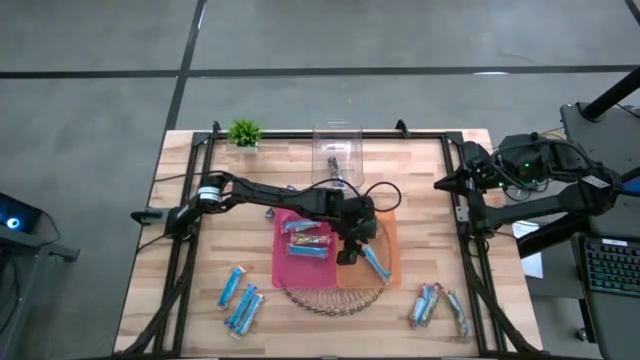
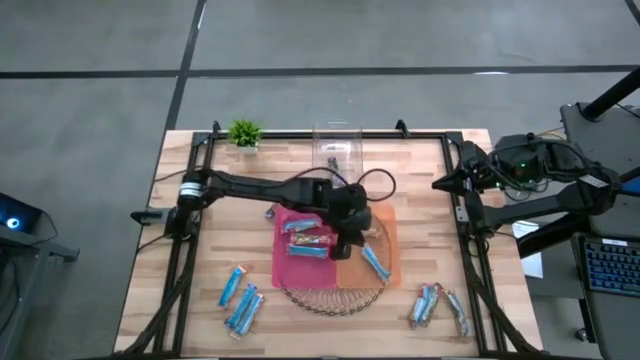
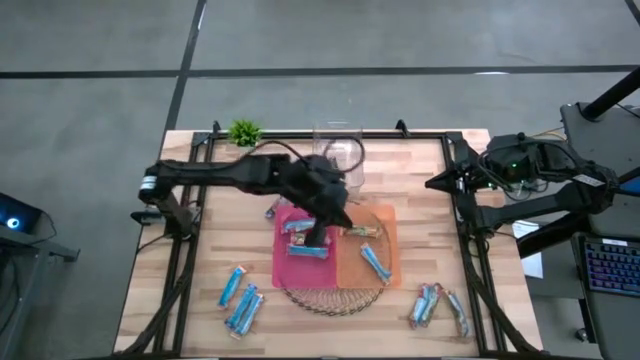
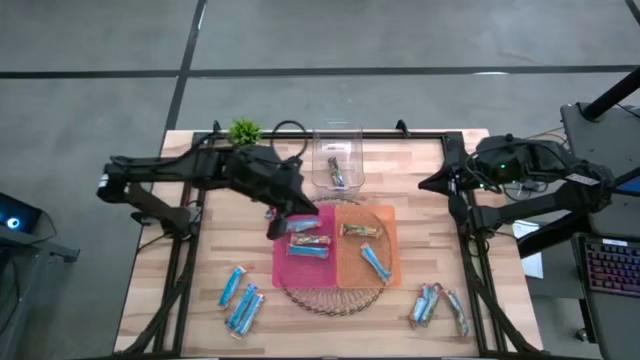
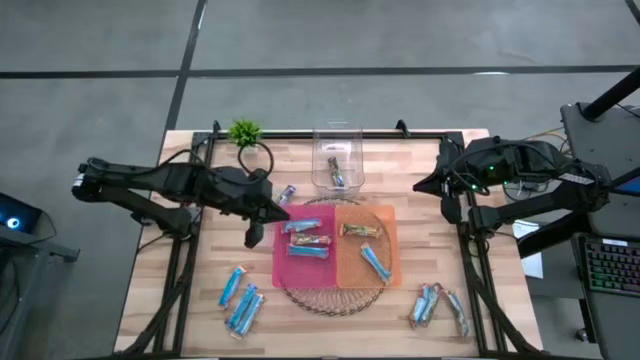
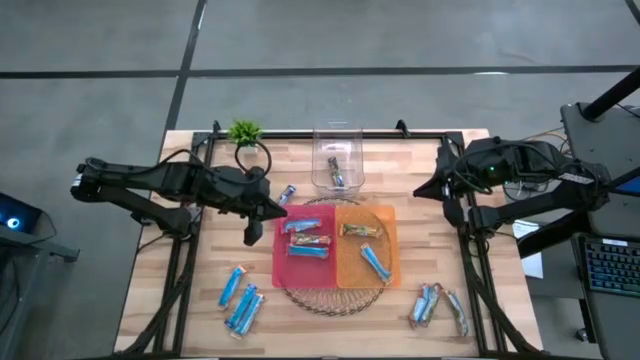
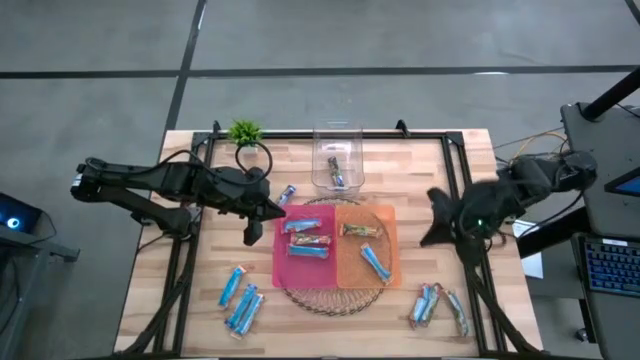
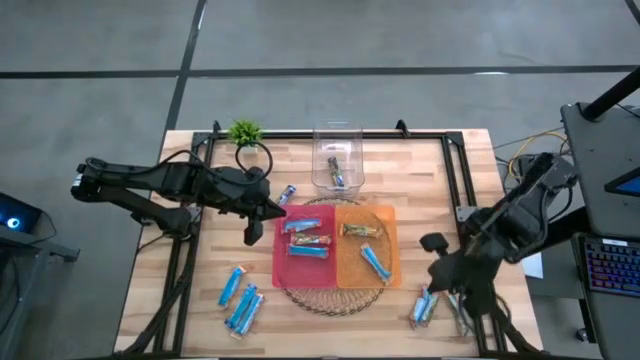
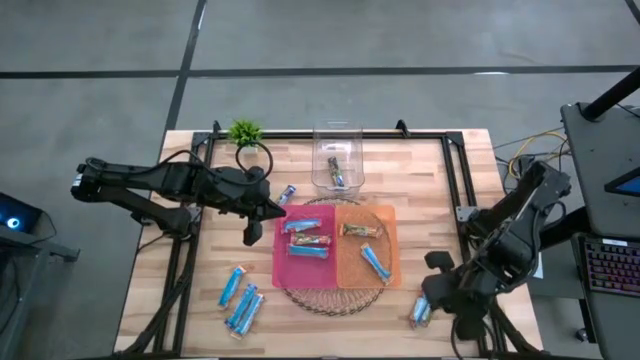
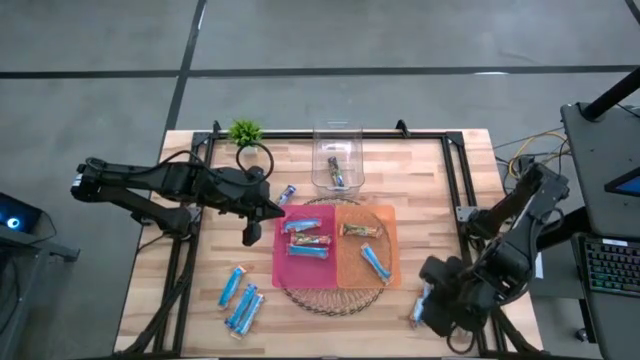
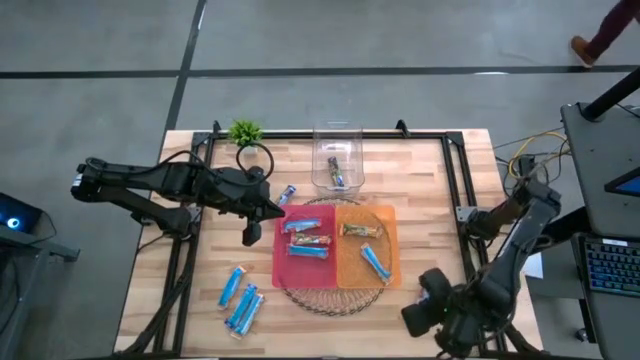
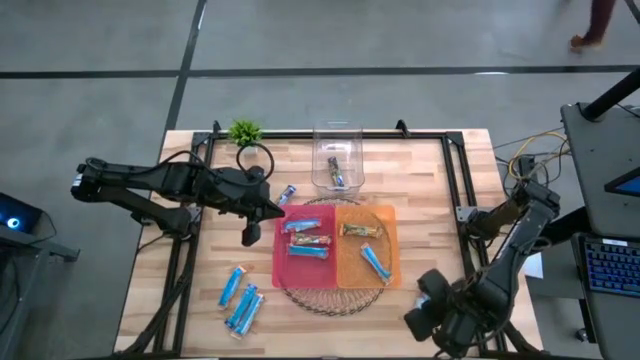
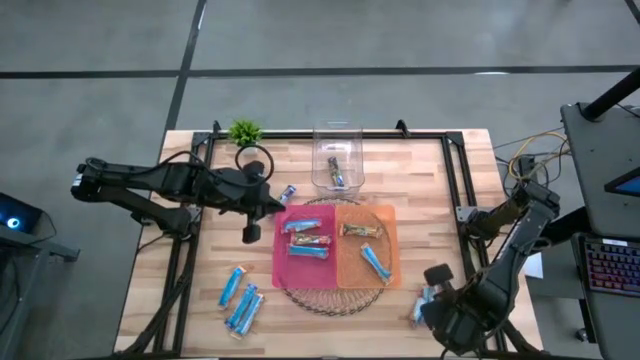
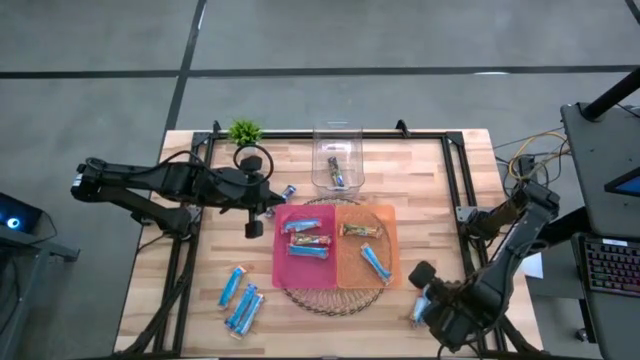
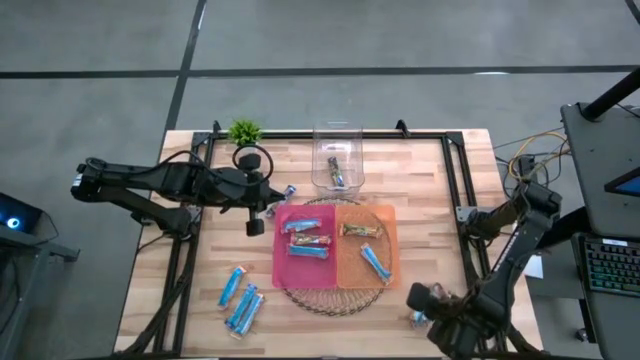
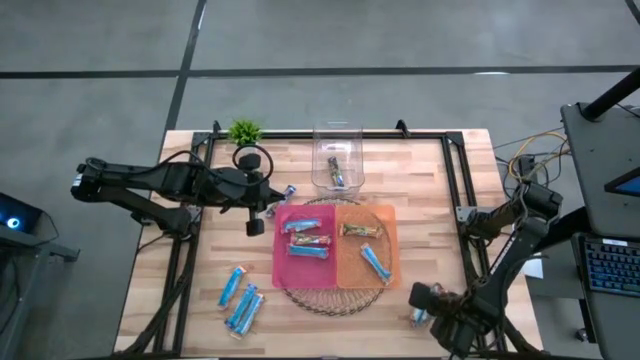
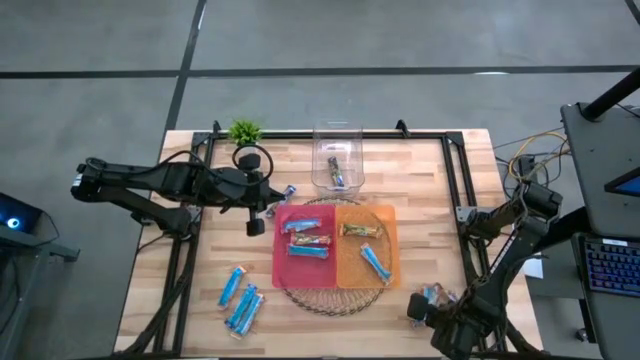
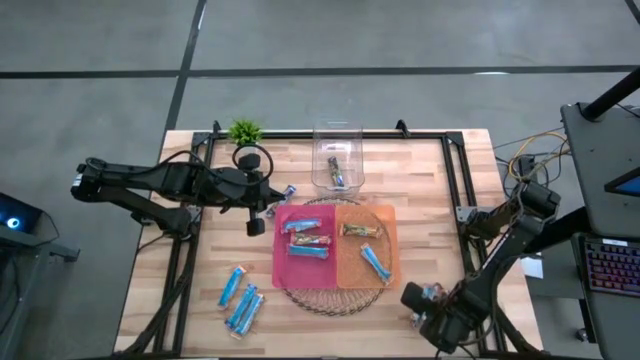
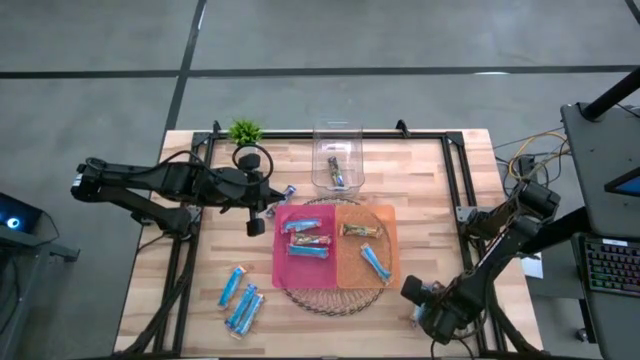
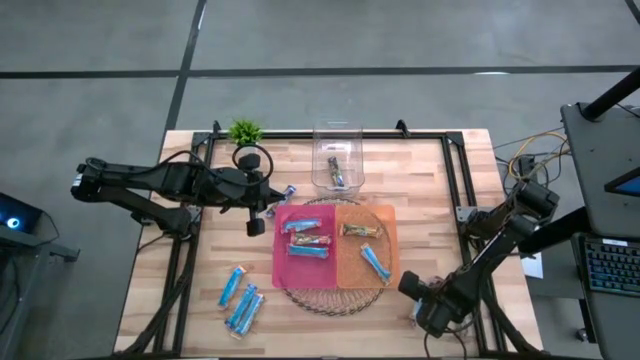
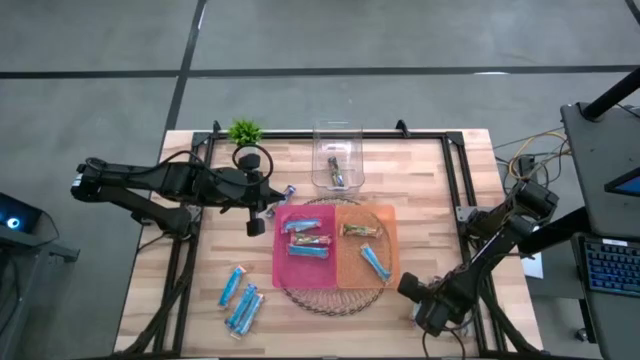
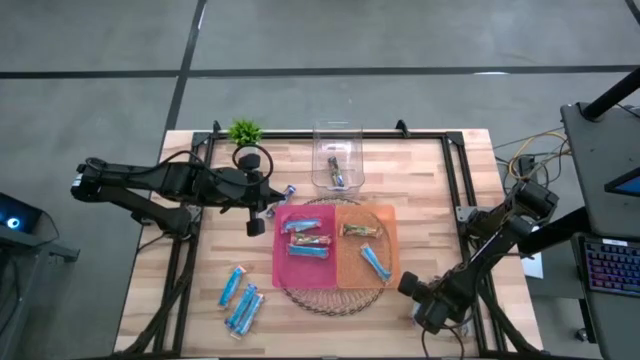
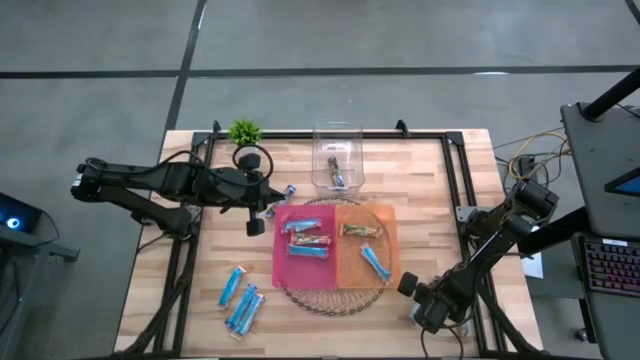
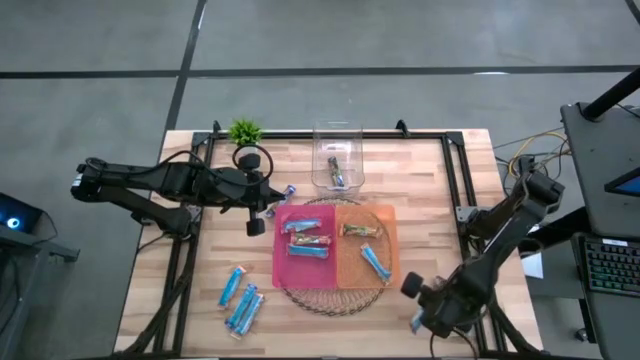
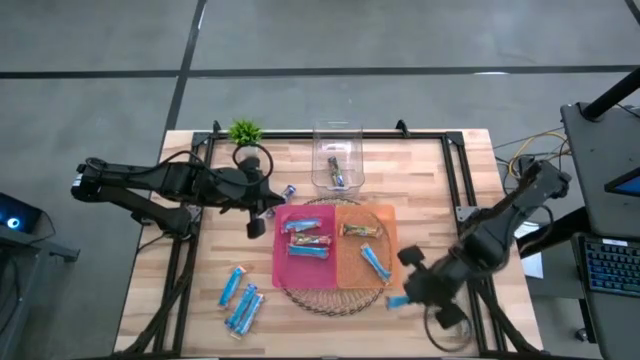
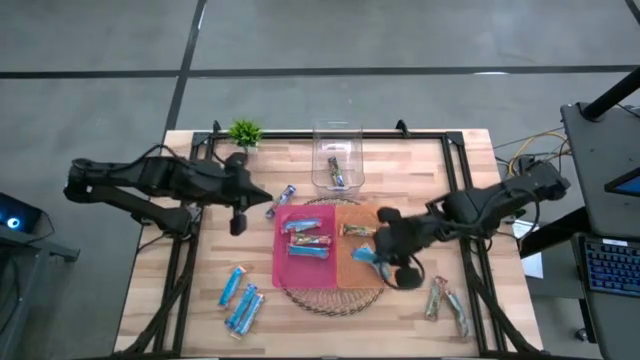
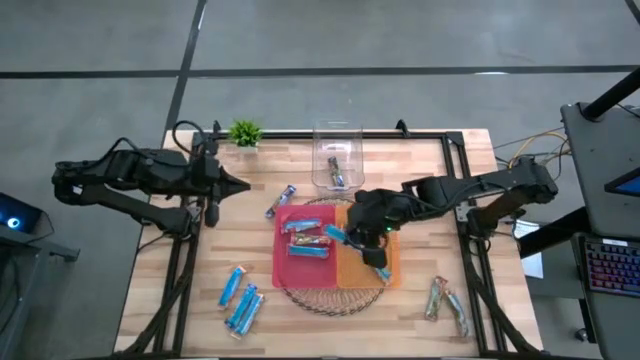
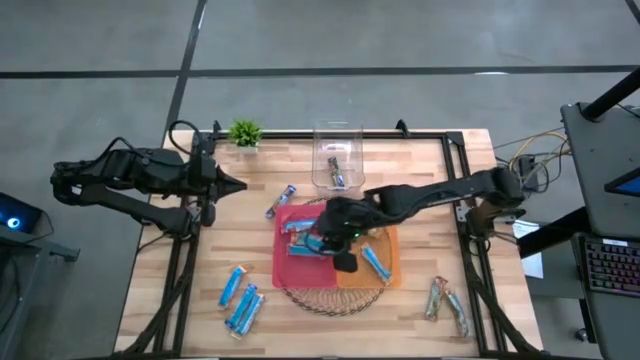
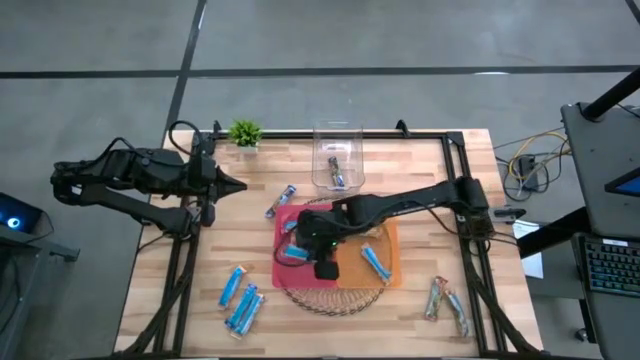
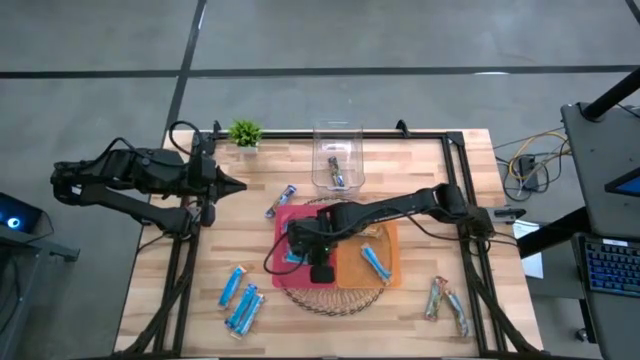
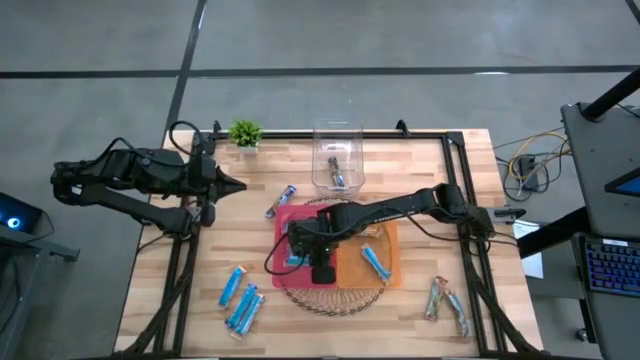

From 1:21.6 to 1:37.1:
Task: Pick and place Granola Bars by type
Put the red granola bar into the red bin

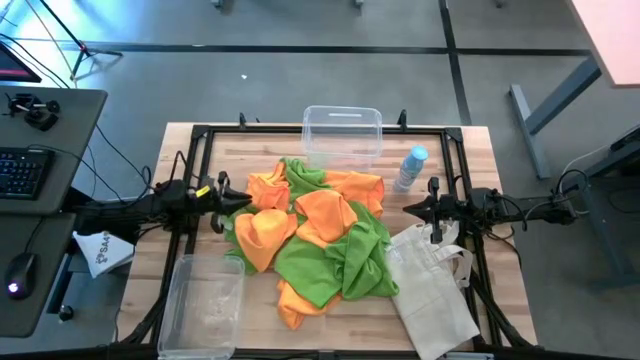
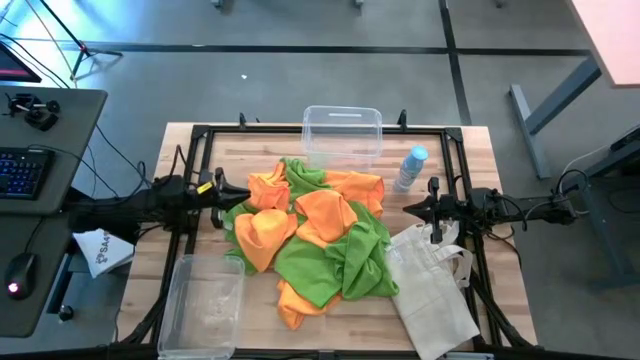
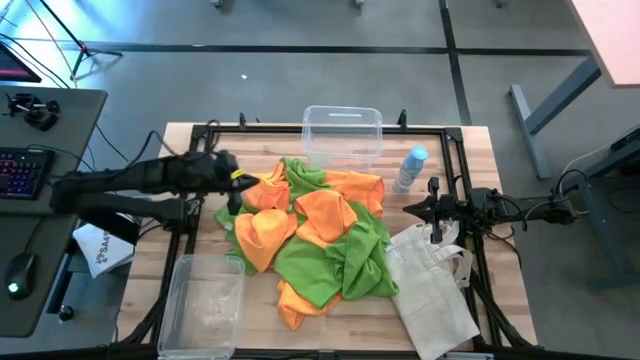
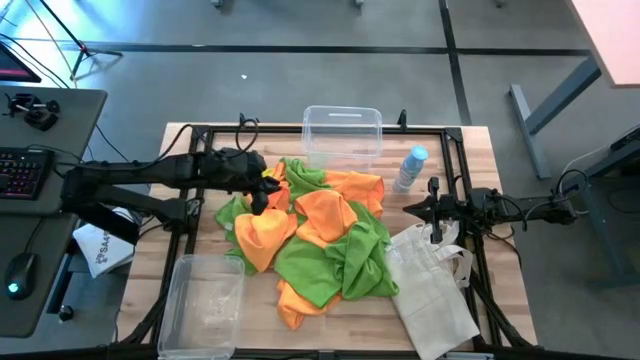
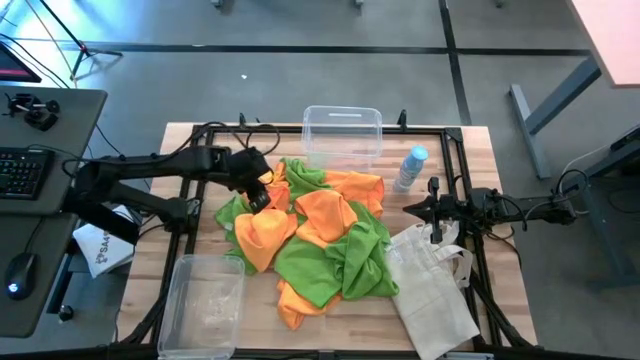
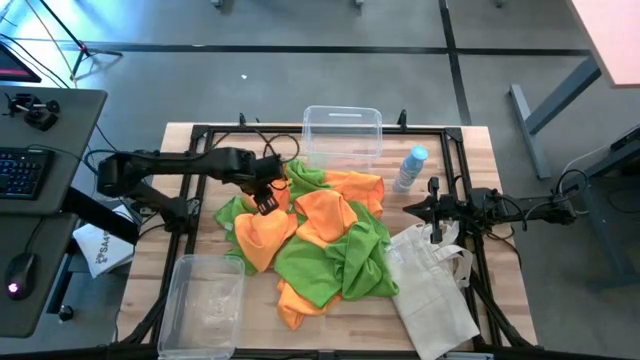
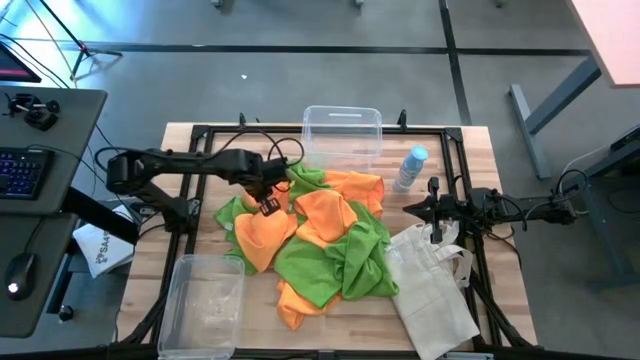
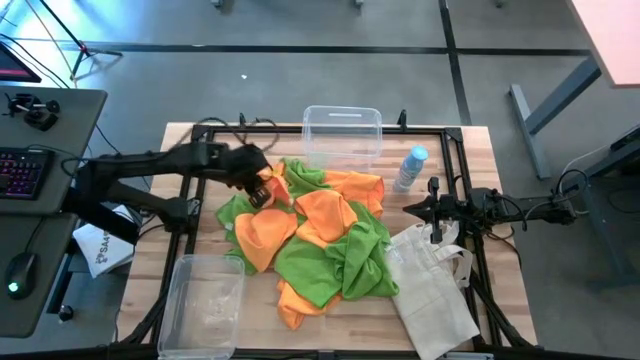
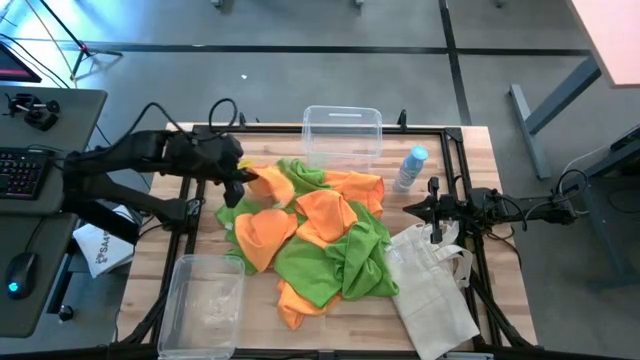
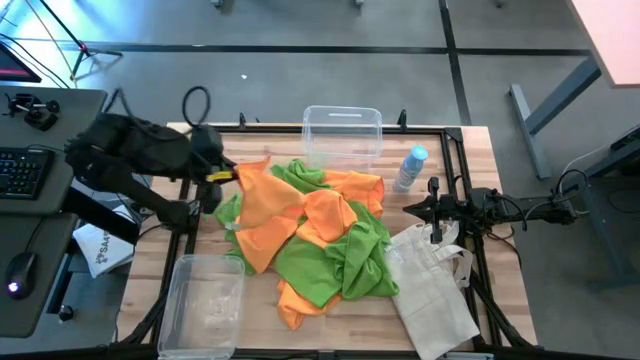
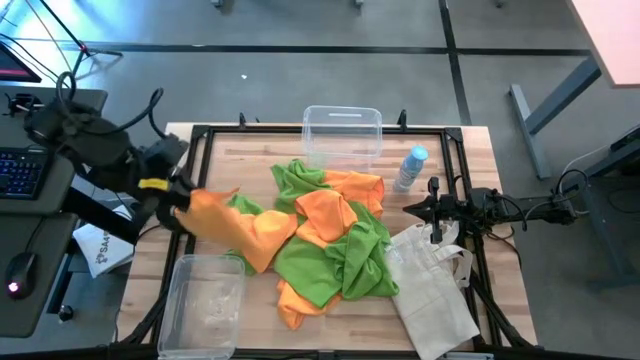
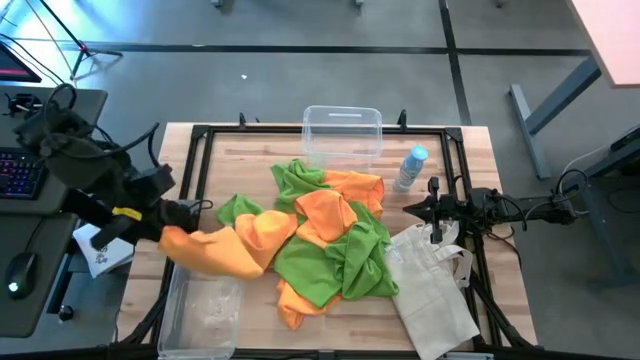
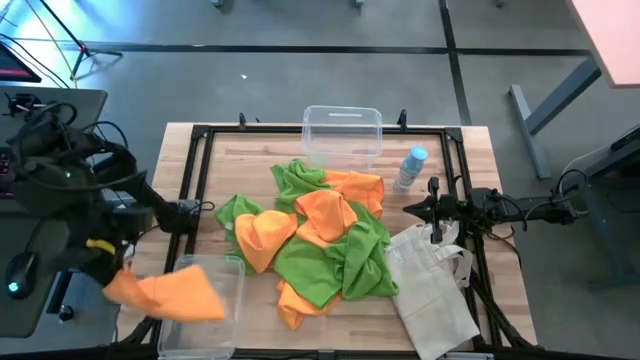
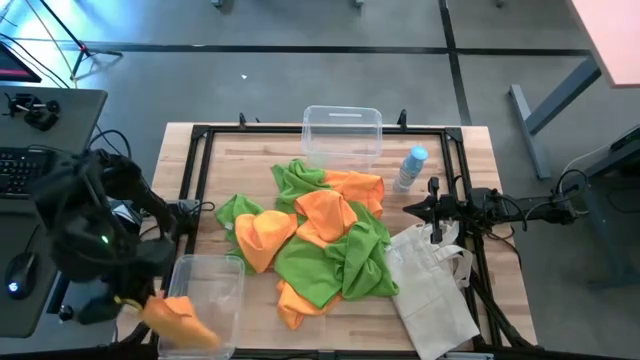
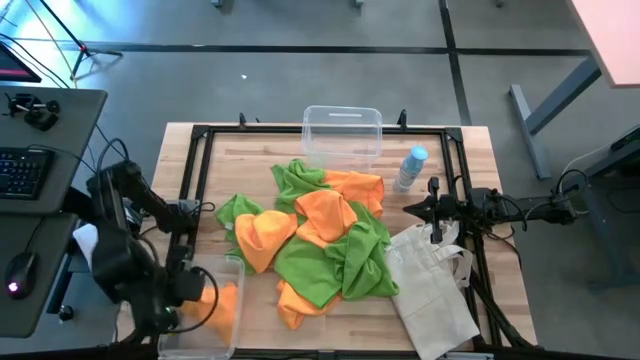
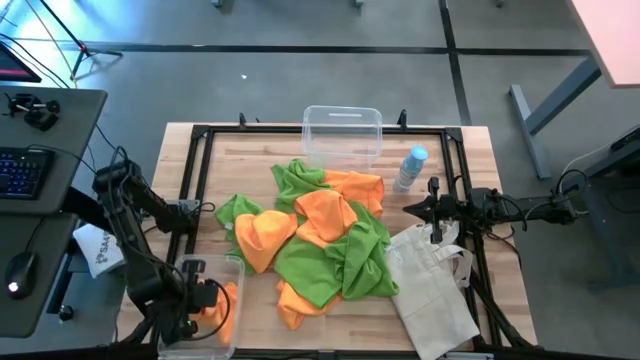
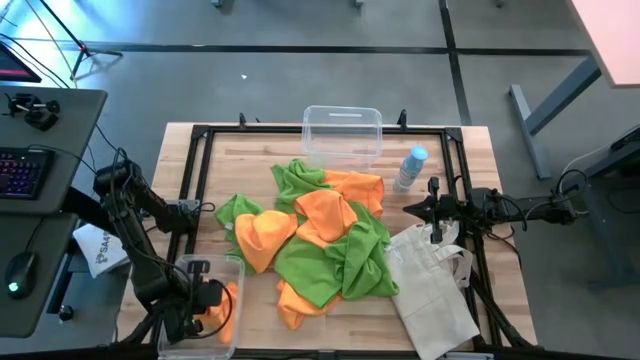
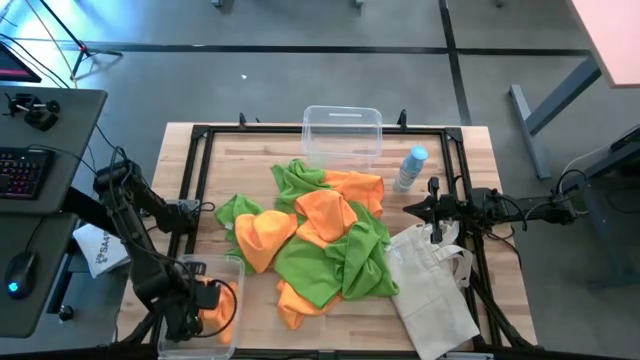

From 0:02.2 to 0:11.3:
Task: Sort microfiber towel by color & place in baskets
Put the orange microfiber towel into the bottom transparent bin
